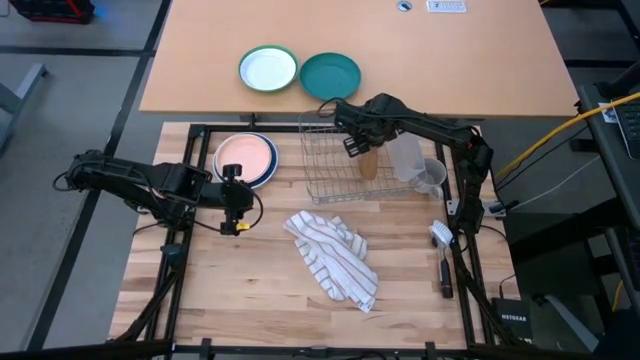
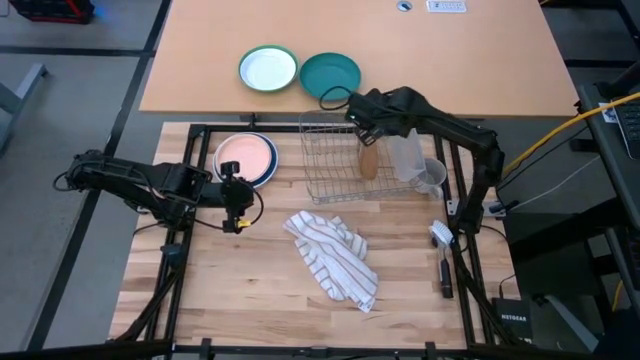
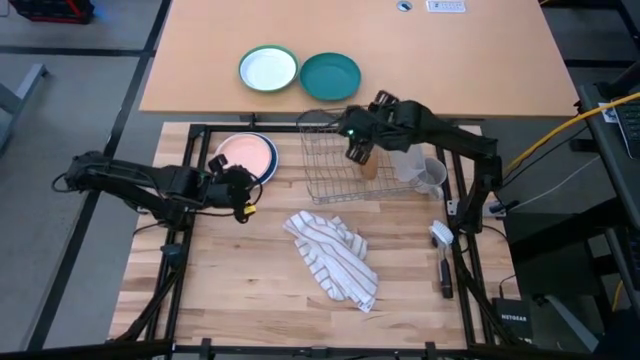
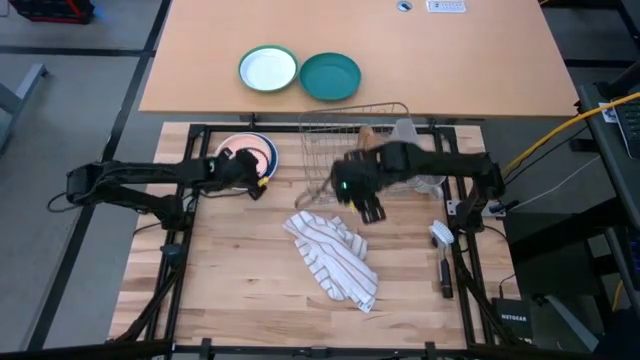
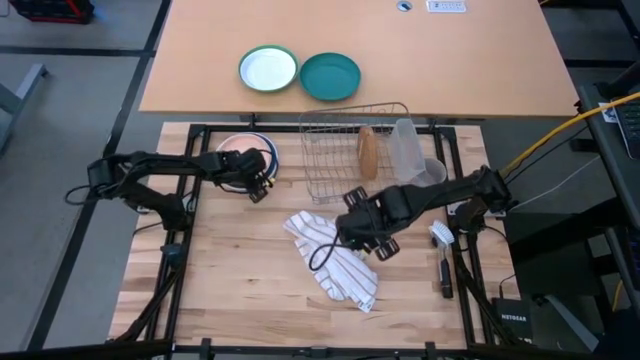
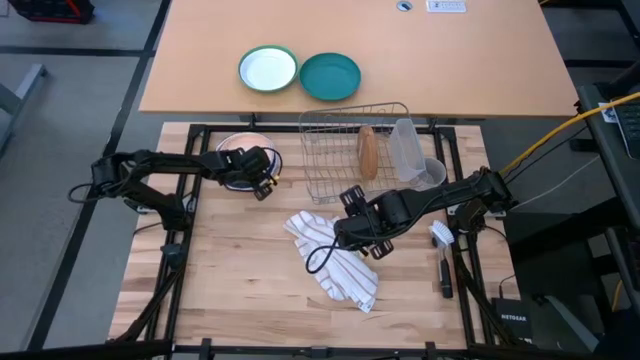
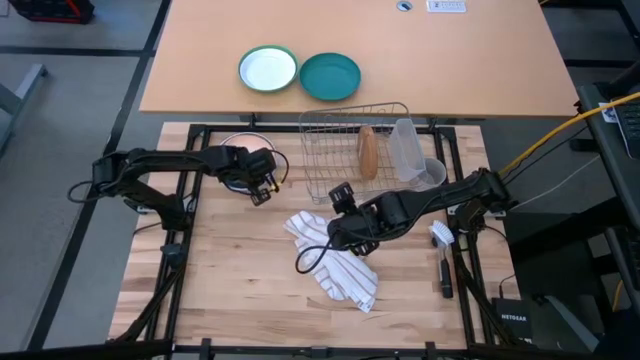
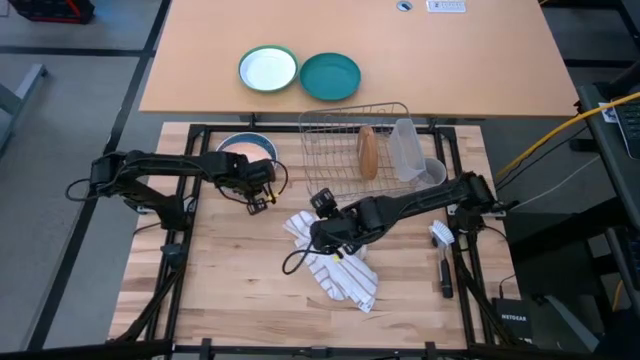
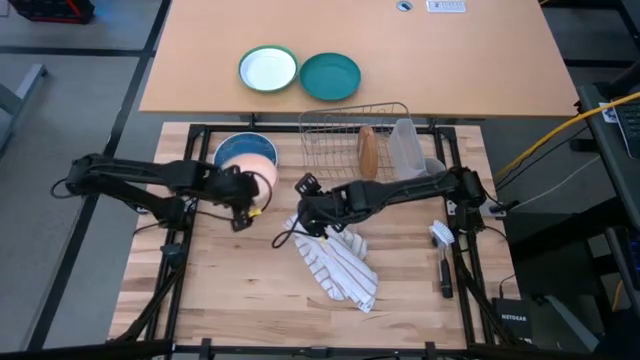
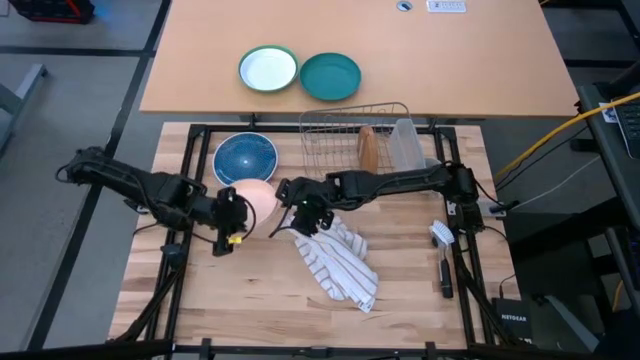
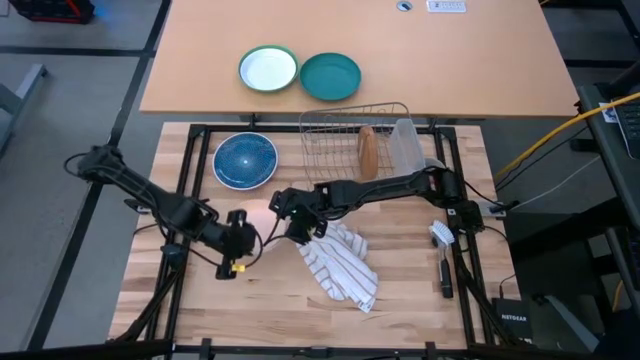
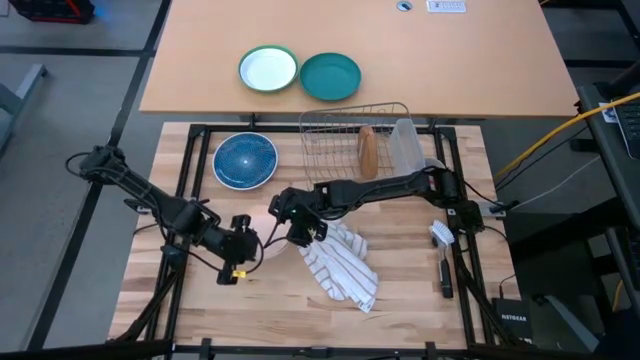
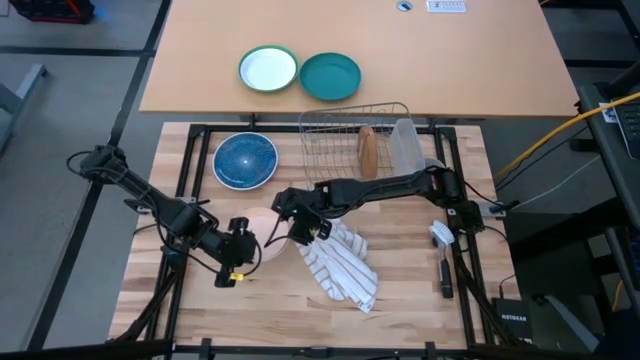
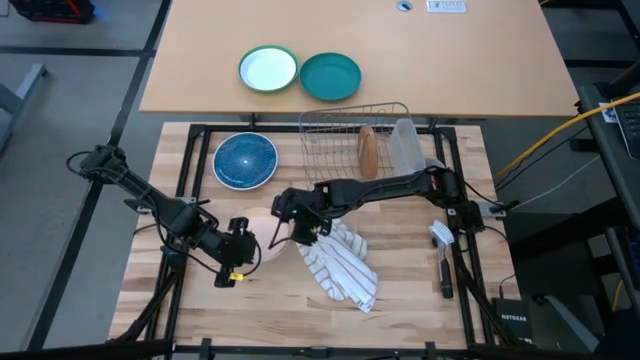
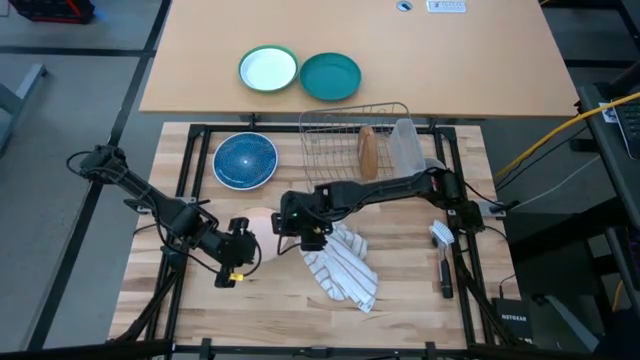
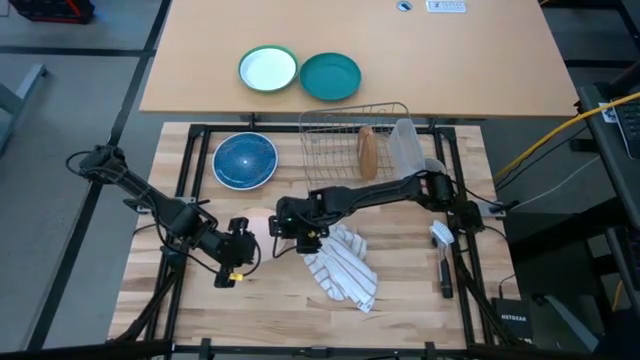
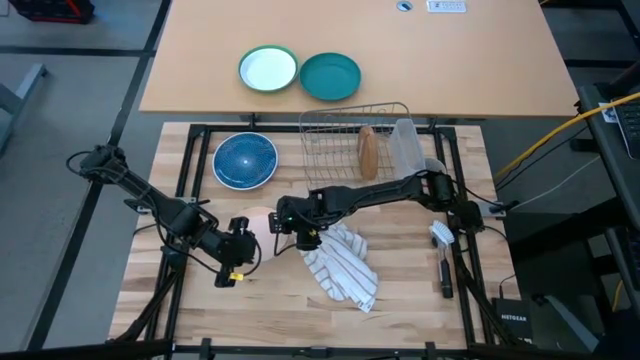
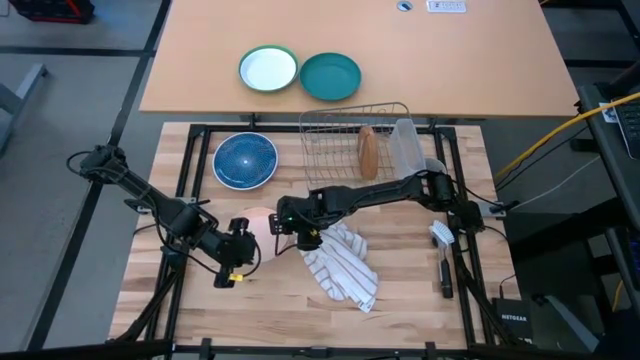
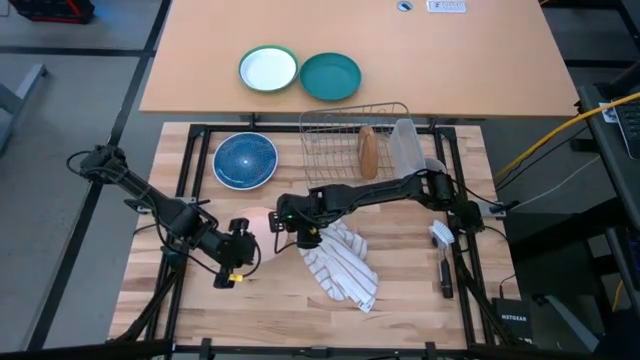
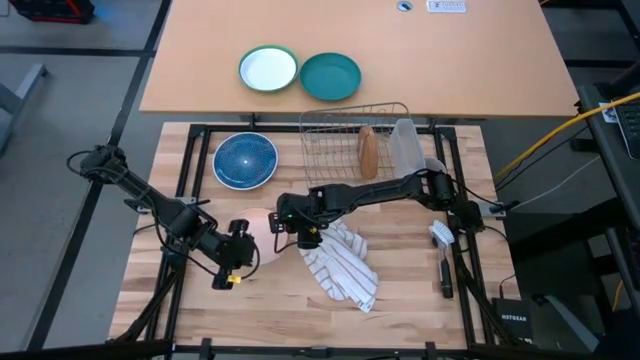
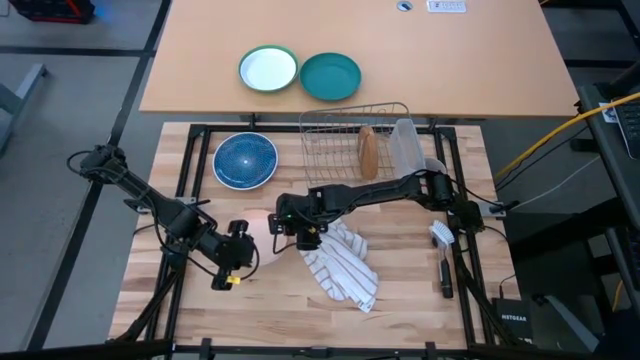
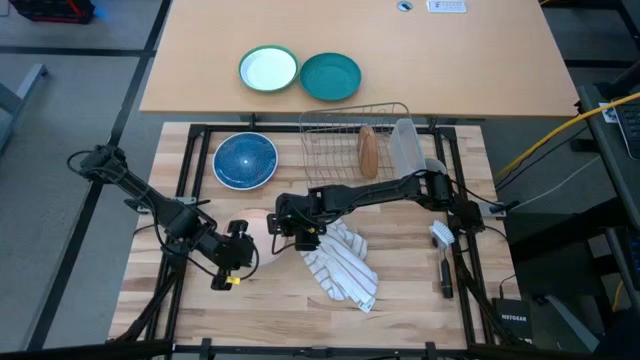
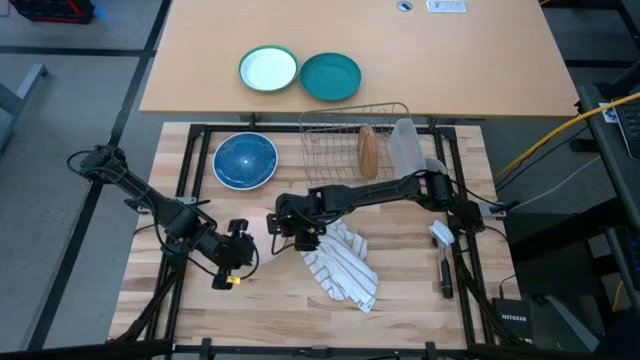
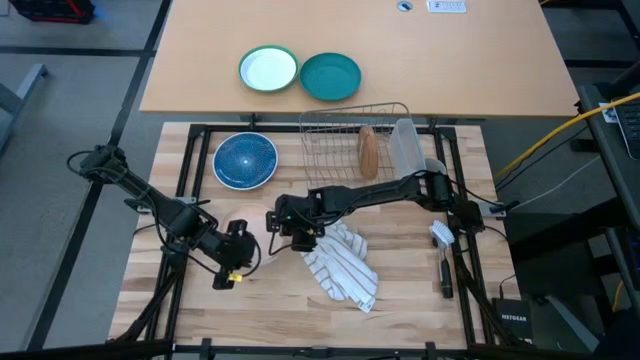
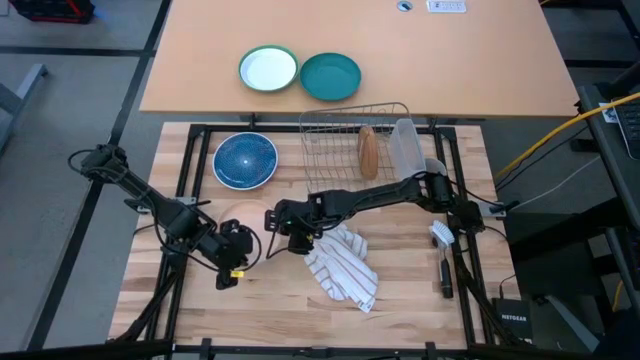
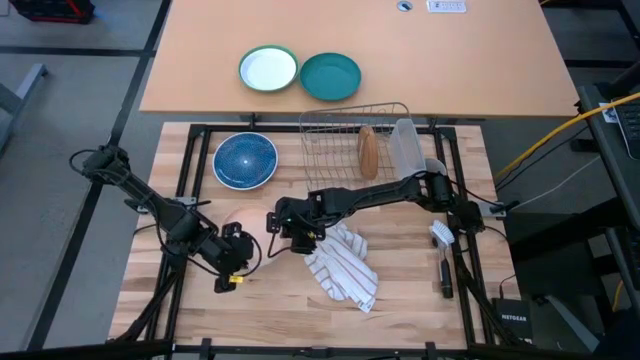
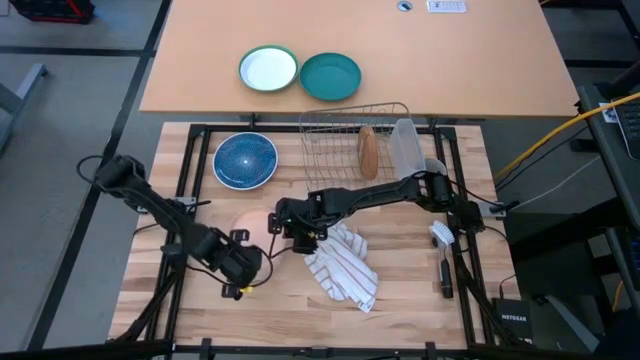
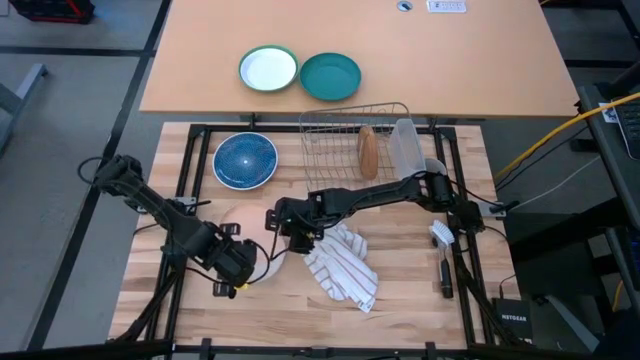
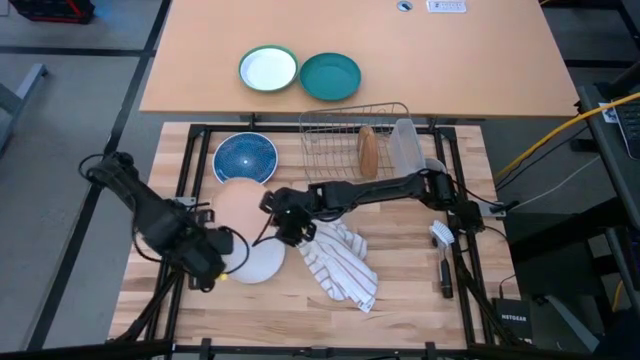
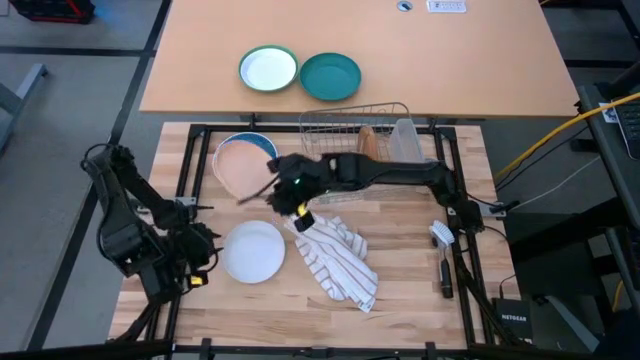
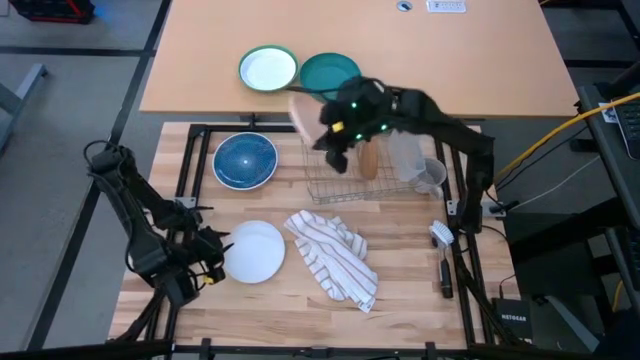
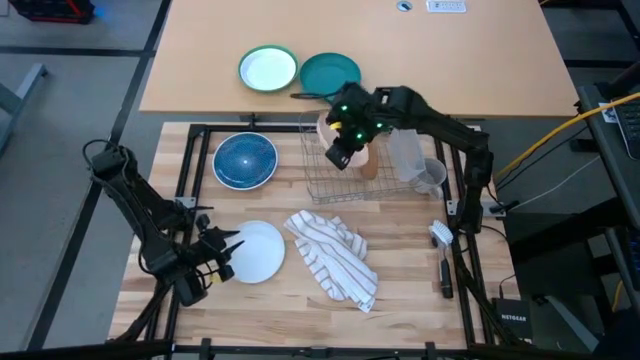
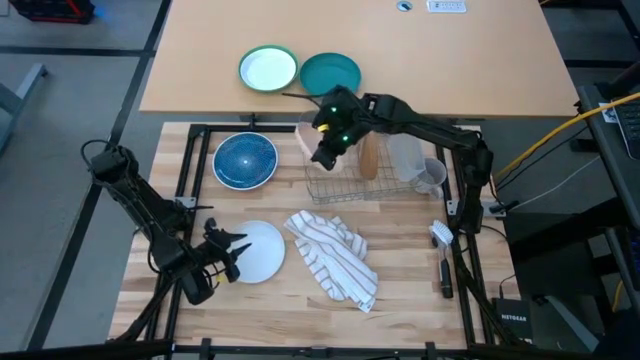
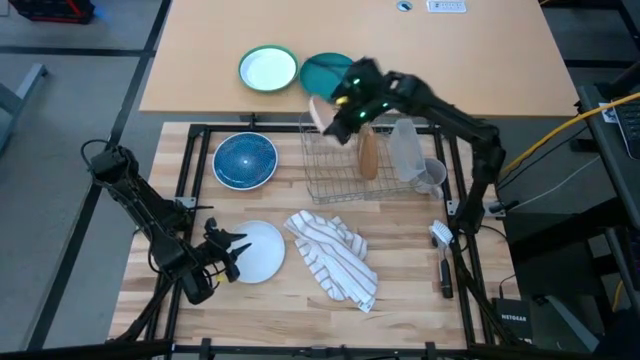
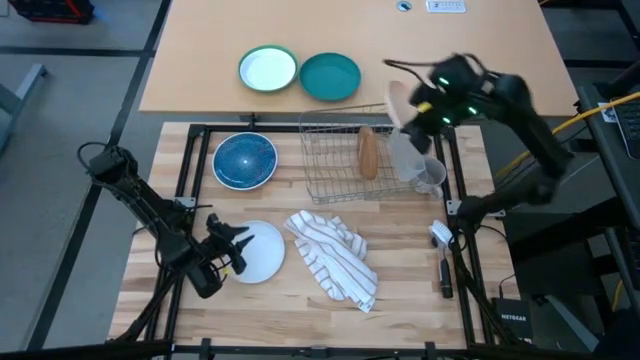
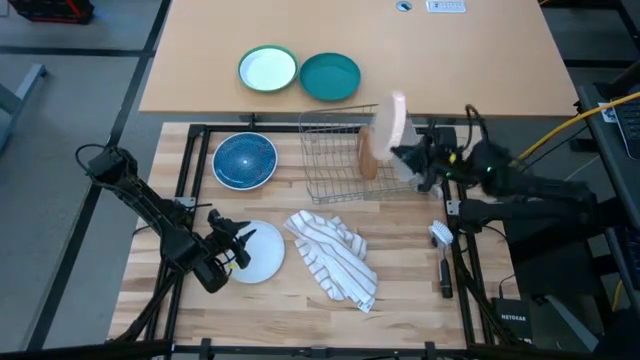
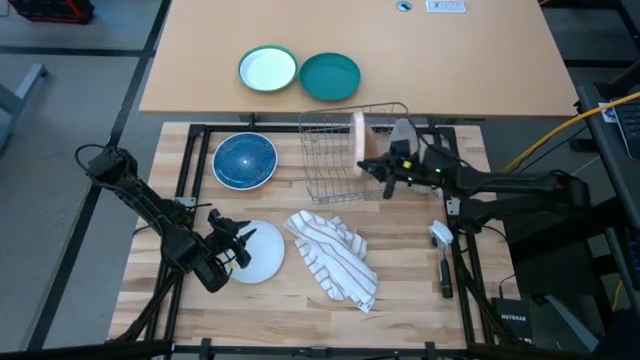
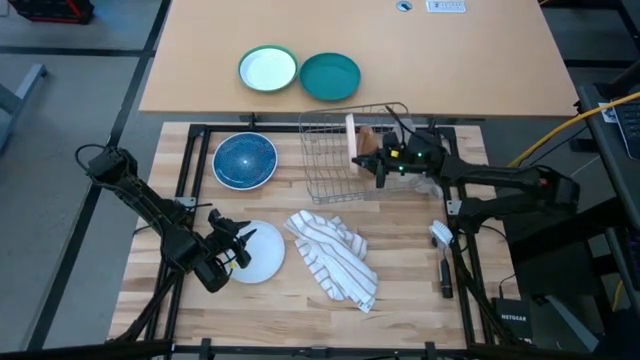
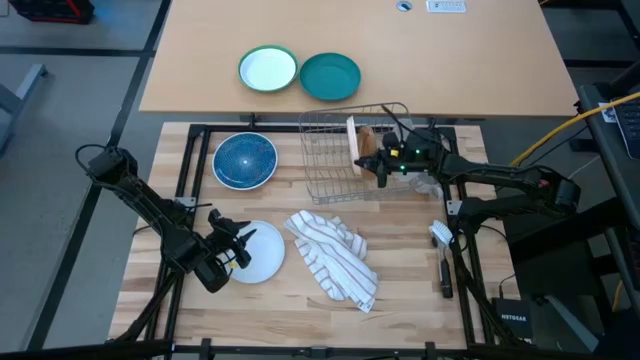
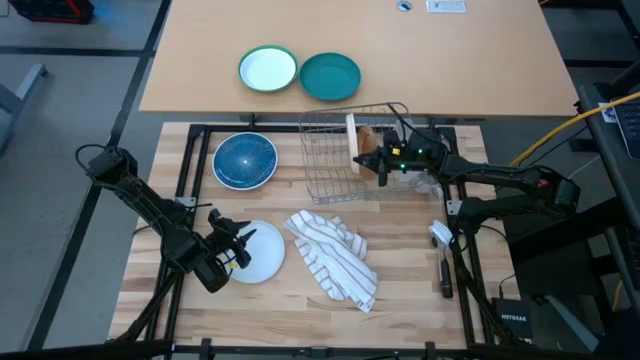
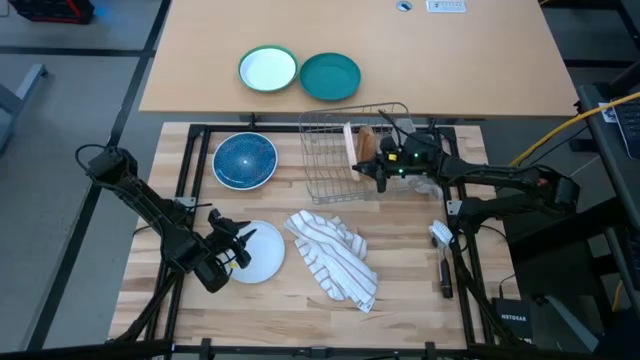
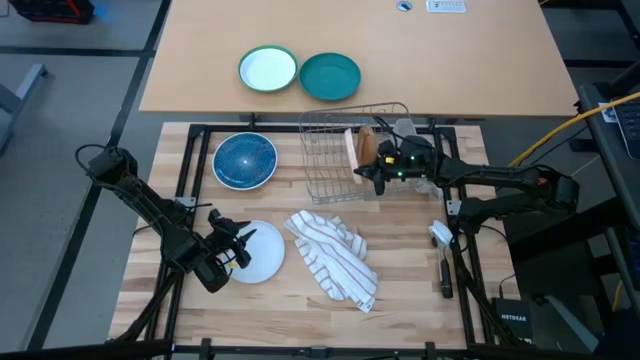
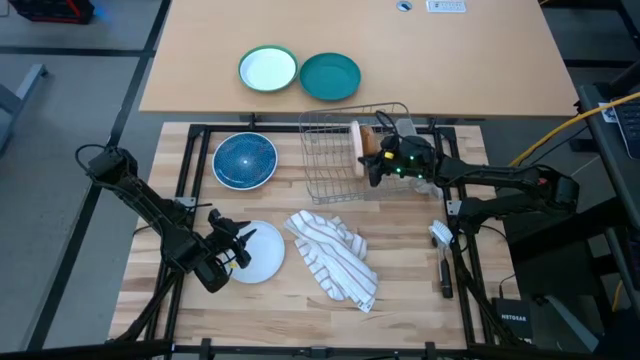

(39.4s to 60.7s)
Task: Sort dishes
Put the orange plate into the dish rack
